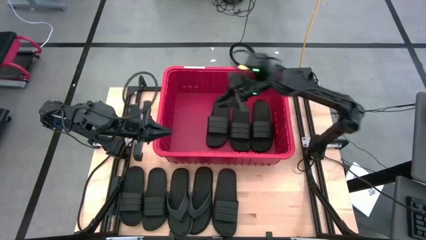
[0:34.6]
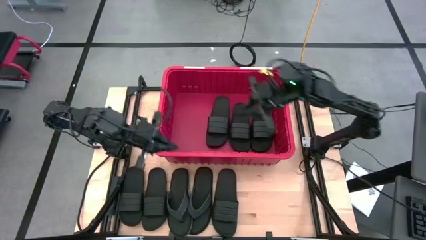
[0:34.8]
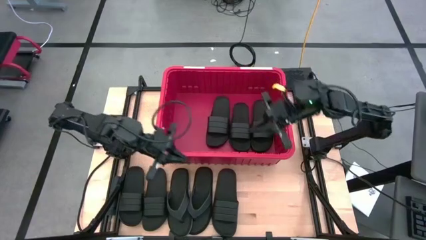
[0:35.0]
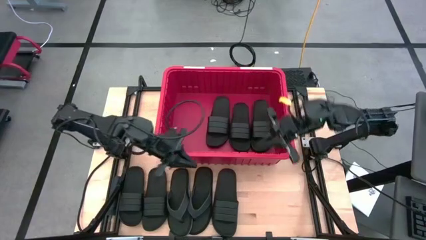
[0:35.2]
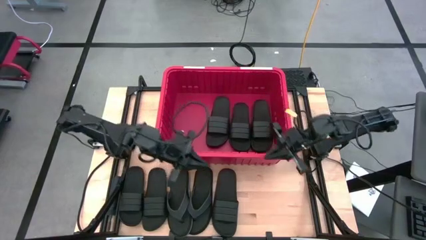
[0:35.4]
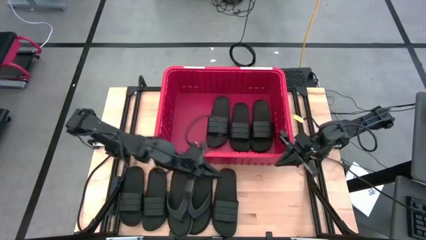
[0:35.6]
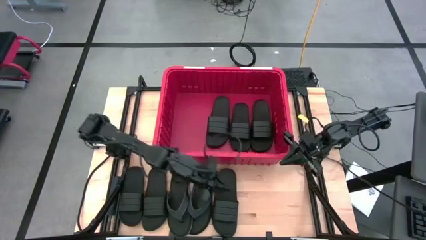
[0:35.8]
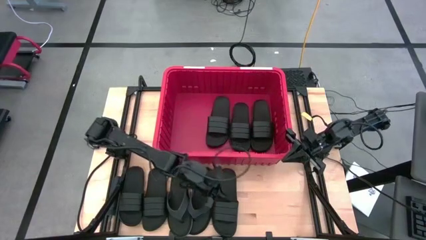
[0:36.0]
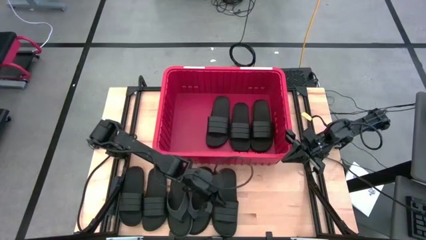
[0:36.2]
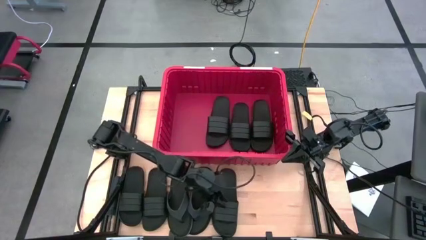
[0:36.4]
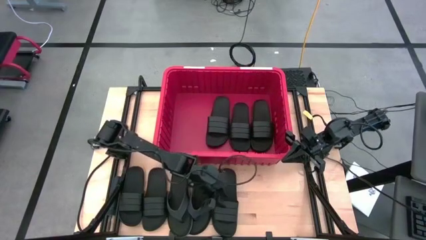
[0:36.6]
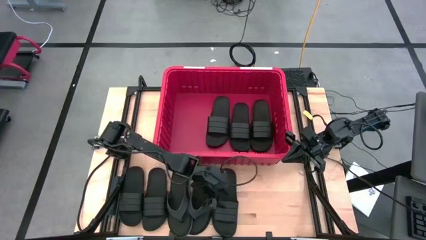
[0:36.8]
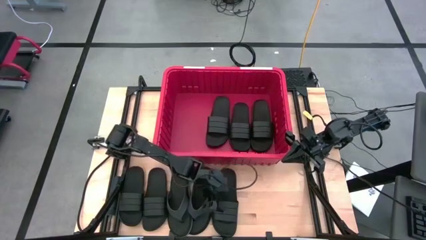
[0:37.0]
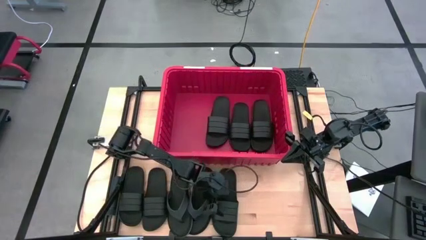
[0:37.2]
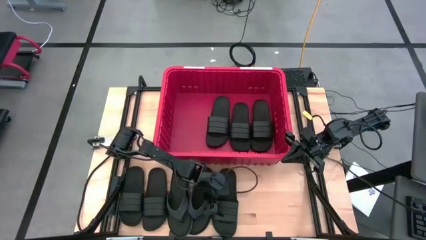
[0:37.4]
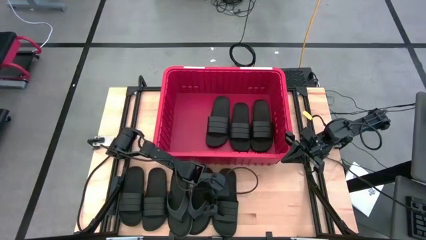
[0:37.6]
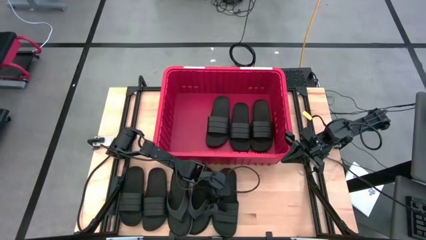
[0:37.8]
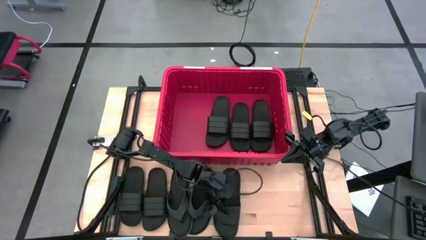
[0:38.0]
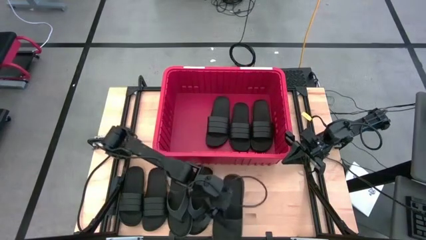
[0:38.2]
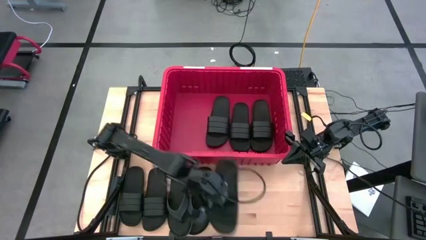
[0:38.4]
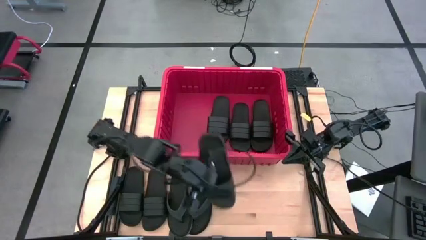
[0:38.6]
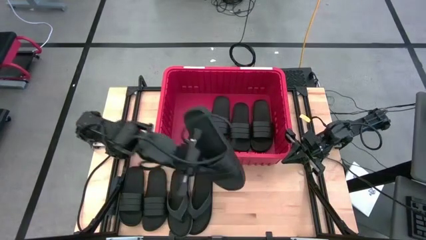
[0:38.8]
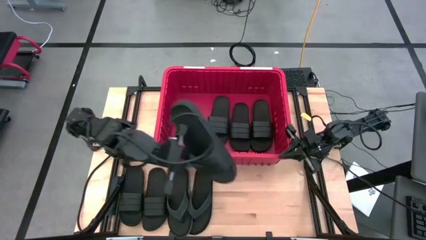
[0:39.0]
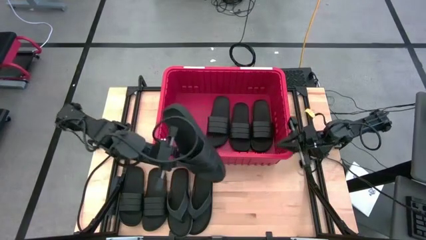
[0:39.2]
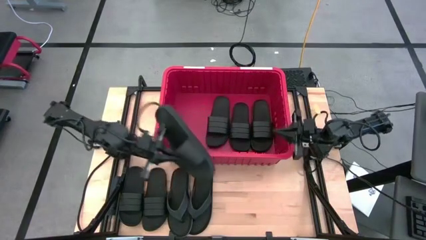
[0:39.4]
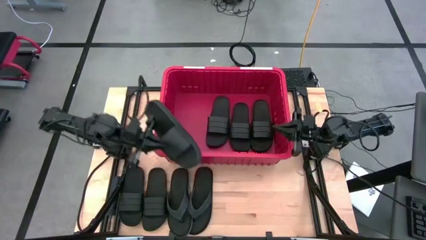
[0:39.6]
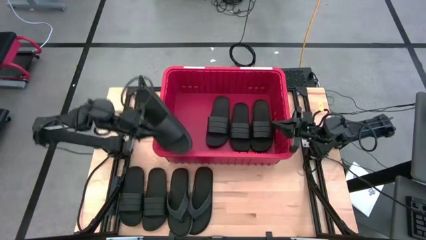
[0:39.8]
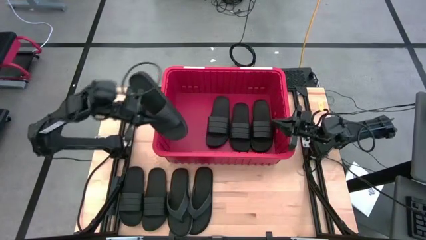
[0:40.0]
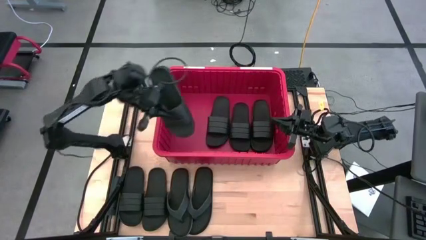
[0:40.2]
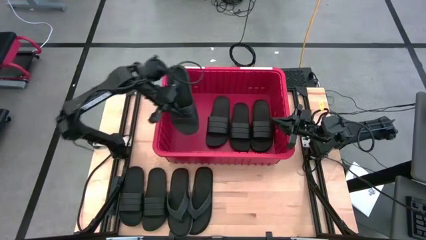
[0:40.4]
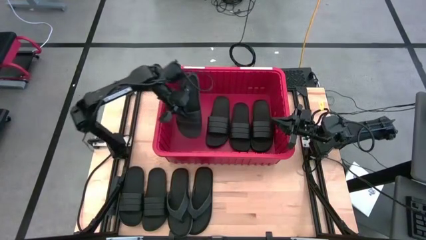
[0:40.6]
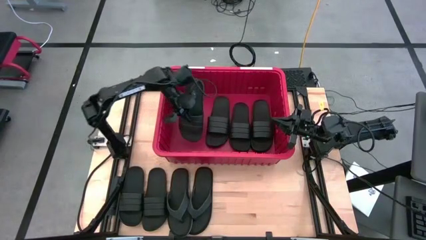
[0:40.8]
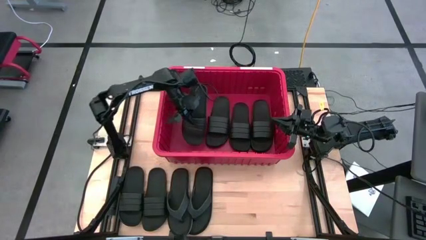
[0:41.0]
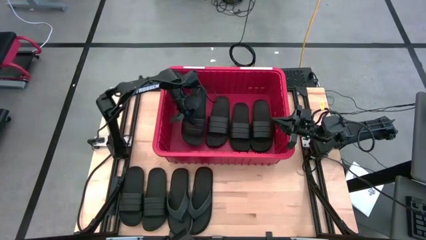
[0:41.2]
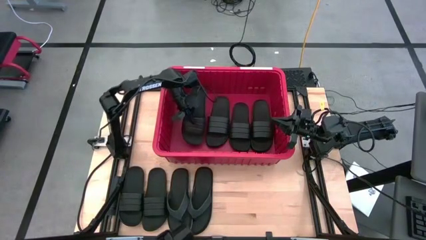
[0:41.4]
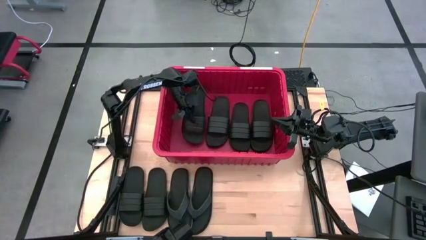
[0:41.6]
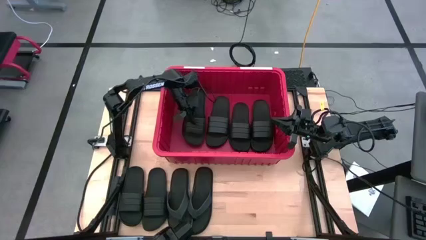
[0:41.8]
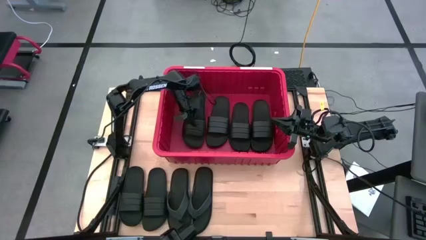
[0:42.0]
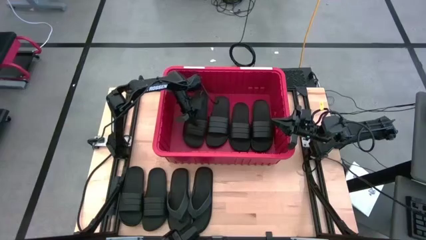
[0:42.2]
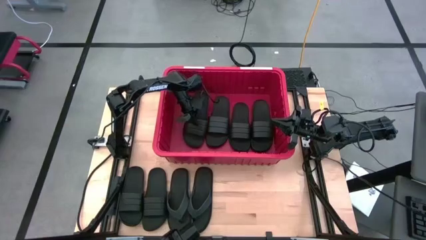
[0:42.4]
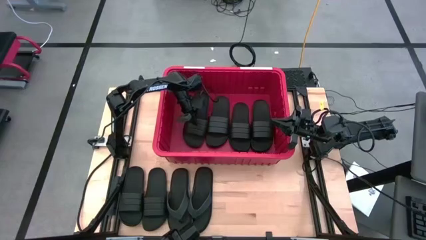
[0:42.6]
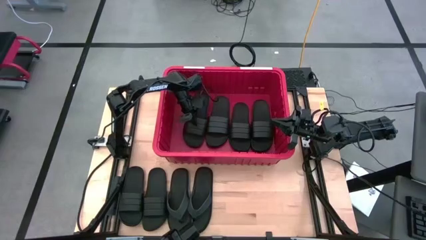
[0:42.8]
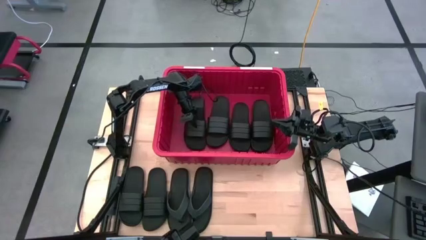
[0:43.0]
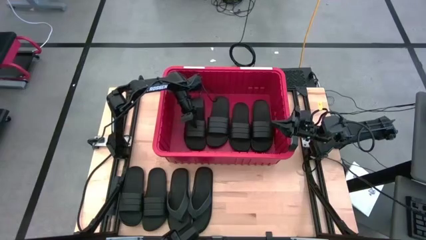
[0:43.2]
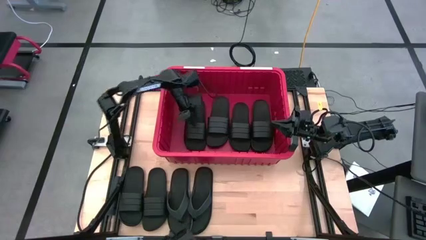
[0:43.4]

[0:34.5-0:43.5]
Task: Pick and place slides into bin
Put the slipper into the bin

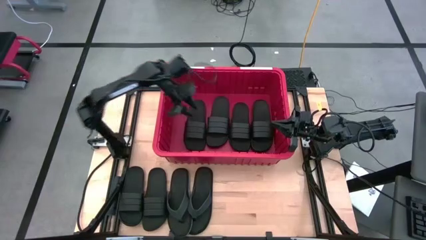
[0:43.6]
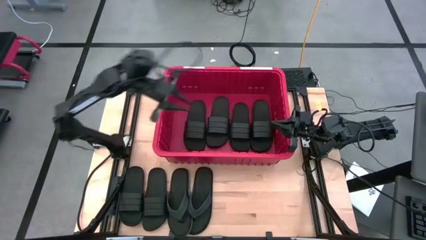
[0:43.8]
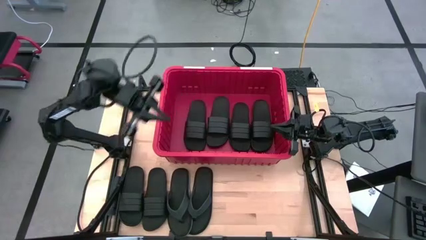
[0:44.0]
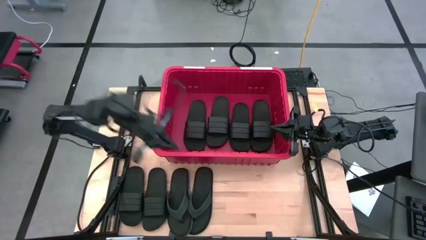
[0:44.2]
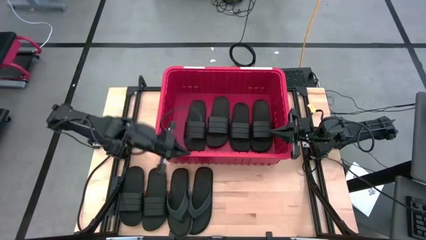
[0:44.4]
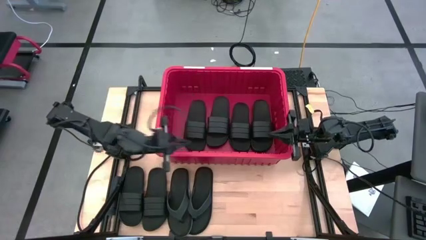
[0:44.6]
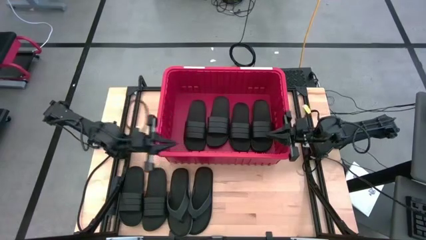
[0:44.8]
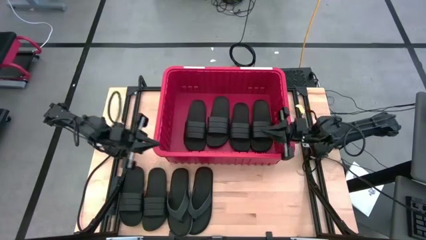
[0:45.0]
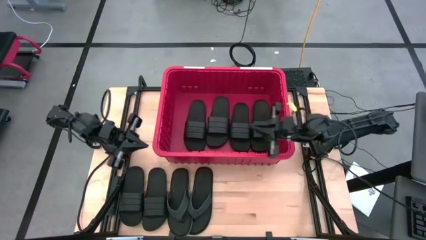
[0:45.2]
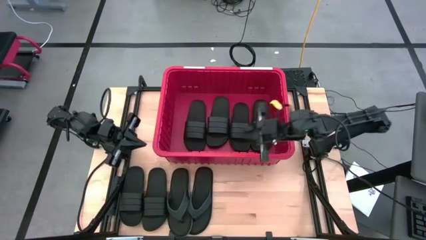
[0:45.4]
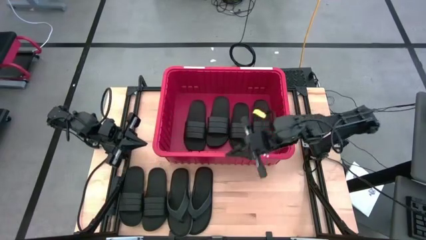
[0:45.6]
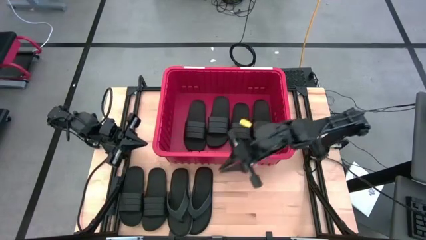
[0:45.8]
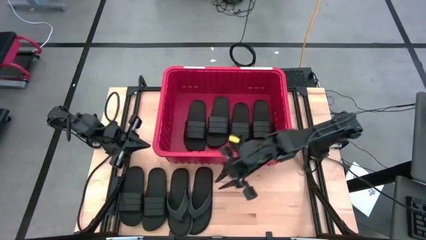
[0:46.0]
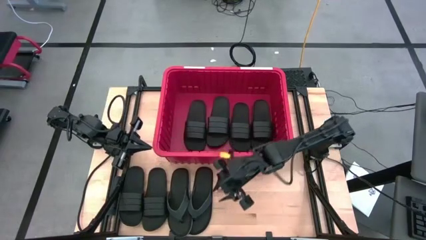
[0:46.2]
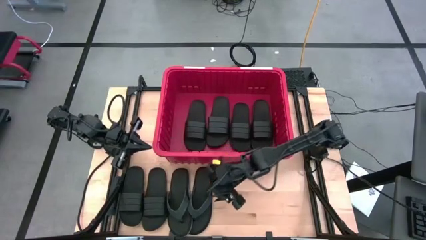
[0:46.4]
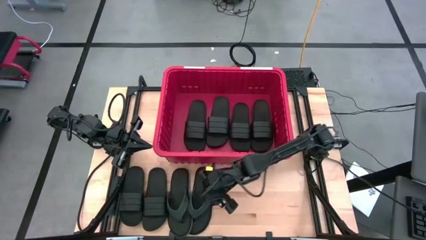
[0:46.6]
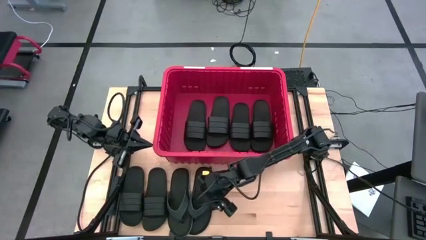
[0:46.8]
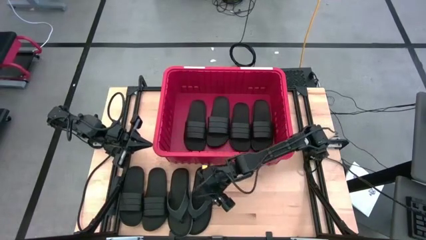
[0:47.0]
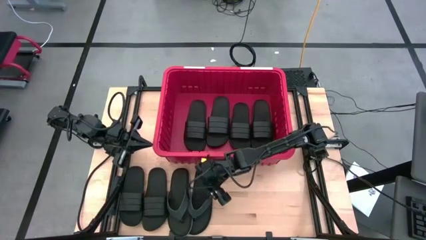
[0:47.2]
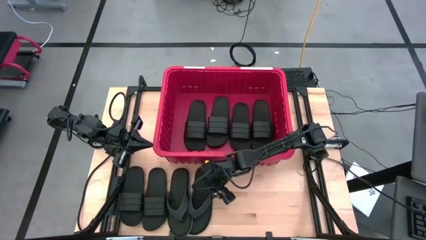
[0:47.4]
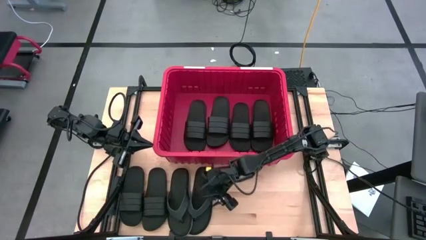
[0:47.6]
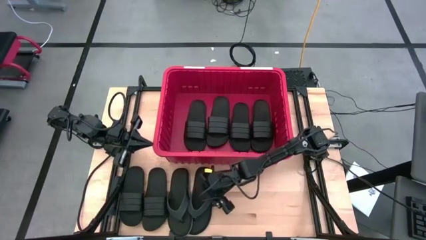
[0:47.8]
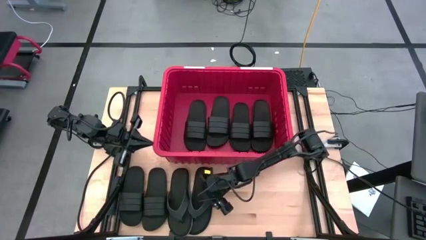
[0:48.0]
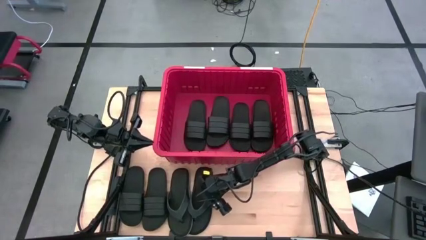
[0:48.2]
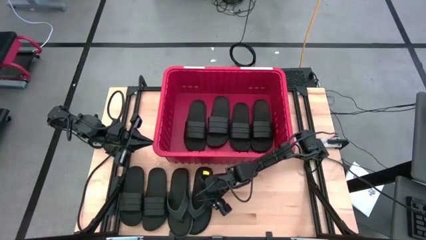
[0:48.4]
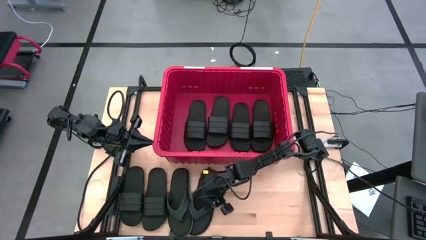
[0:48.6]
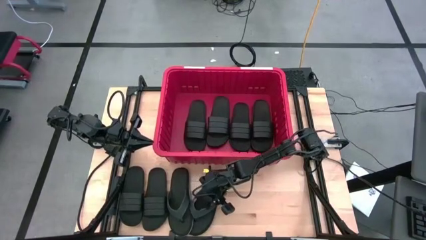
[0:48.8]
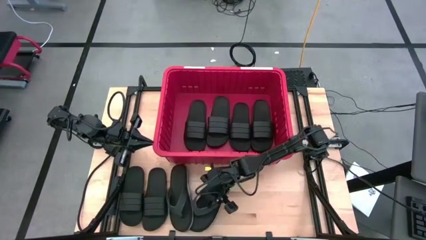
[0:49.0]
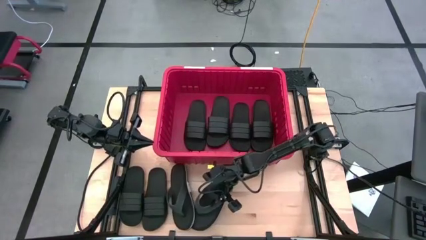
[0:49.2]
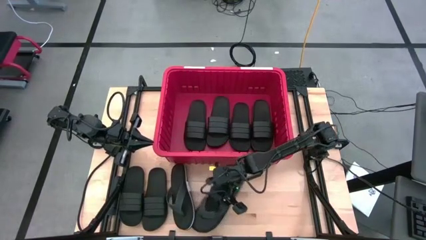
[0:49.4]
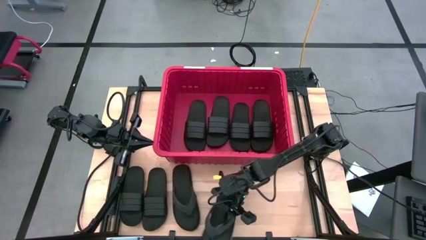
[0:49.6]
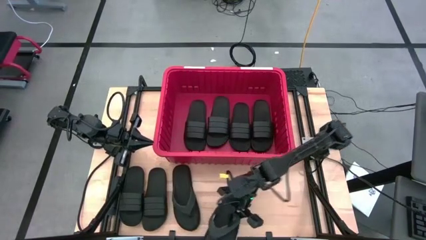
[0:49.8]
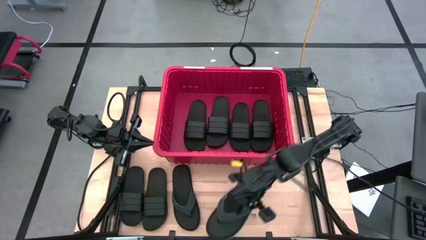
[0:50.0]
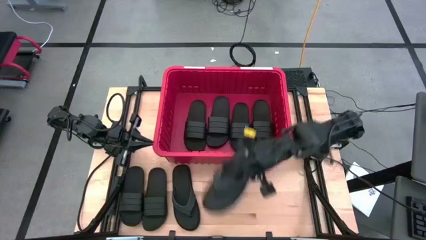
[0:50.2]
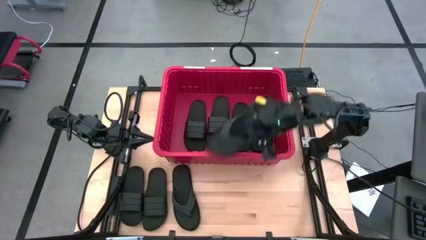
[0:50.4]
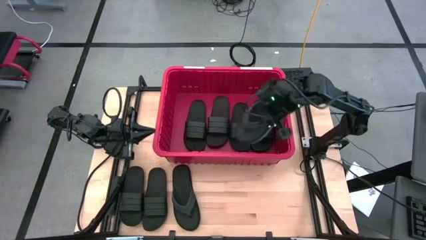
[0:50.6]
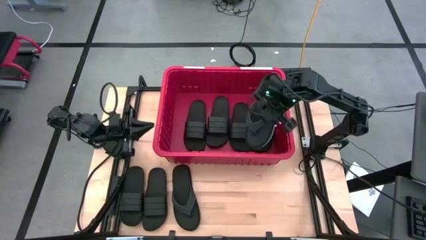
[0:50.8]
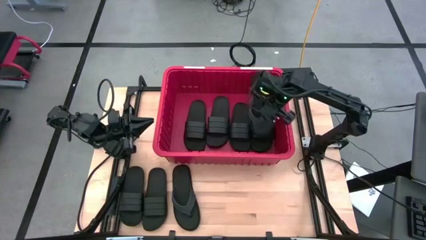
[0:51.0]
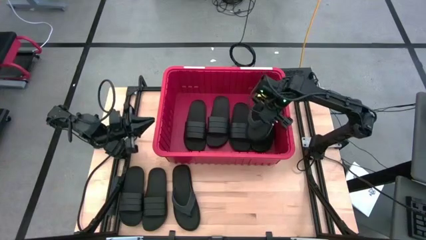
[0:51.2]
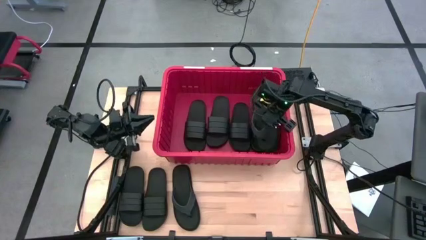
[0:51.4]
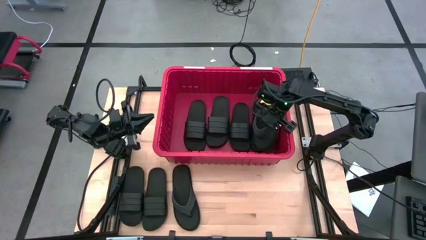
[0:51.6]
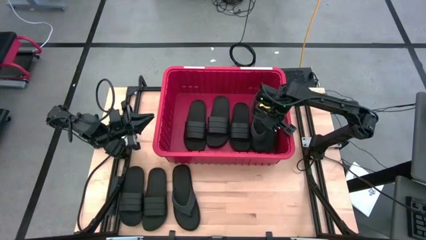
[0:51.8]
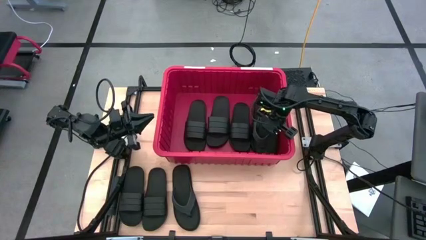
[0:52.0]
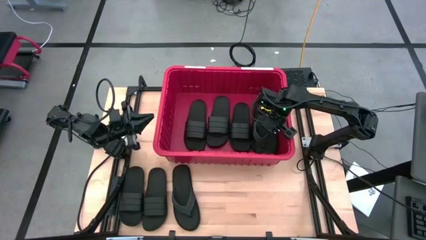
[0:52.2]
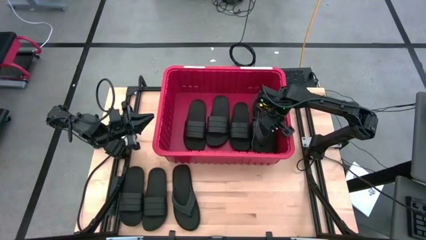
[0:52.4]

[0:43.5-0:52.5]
Put the slipper into the bin
